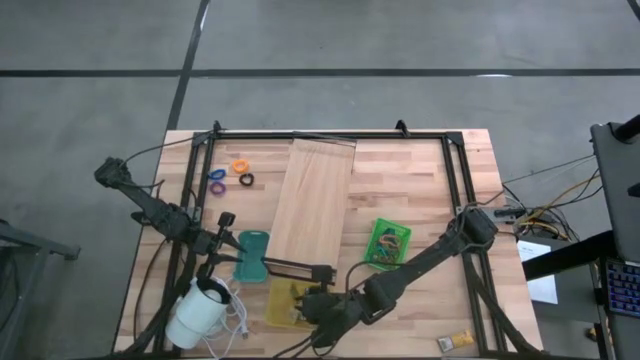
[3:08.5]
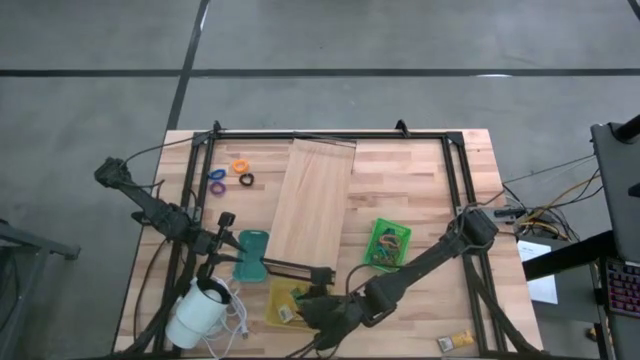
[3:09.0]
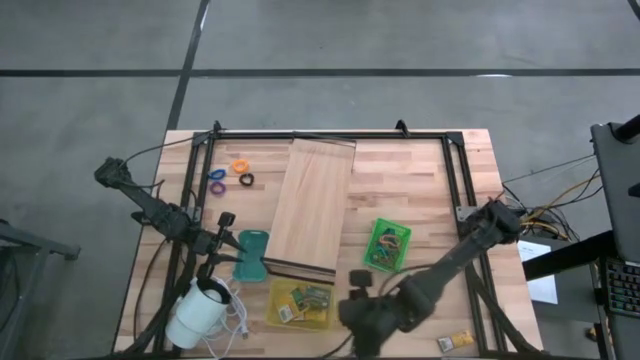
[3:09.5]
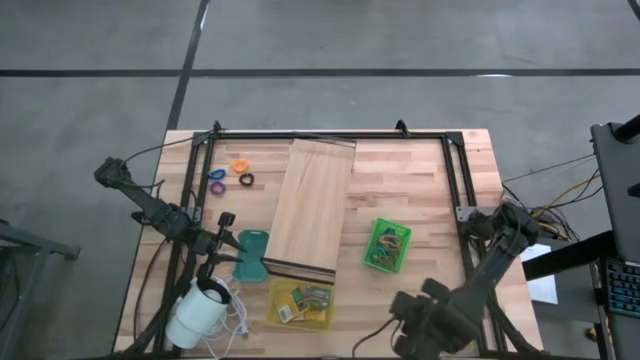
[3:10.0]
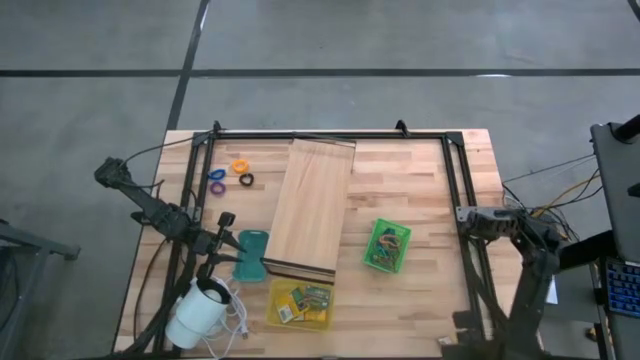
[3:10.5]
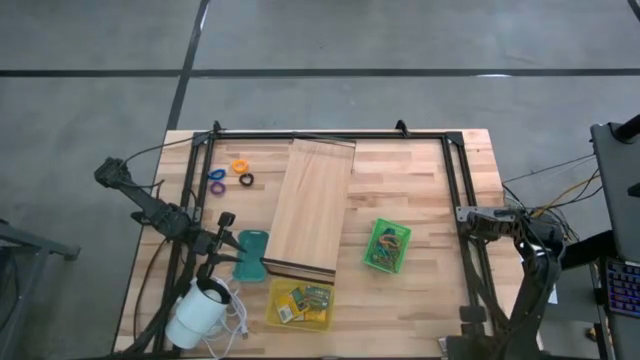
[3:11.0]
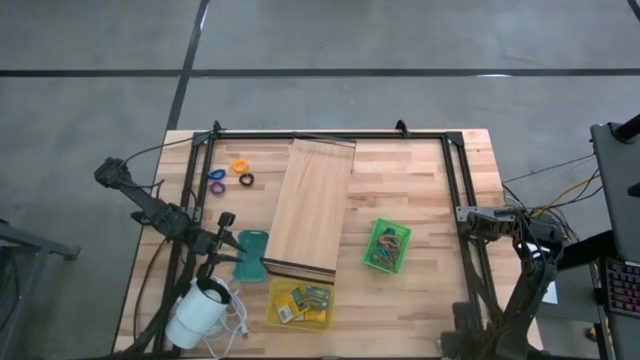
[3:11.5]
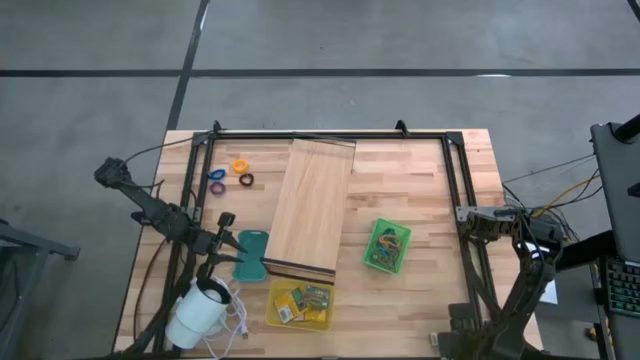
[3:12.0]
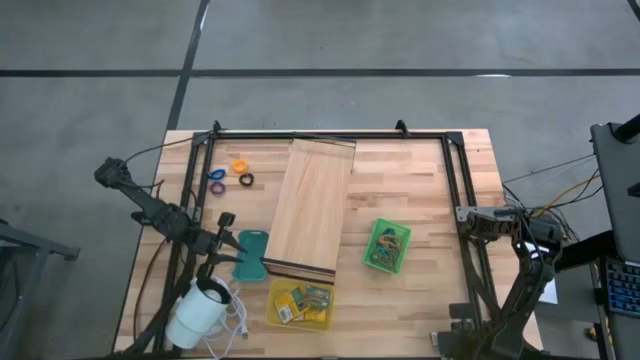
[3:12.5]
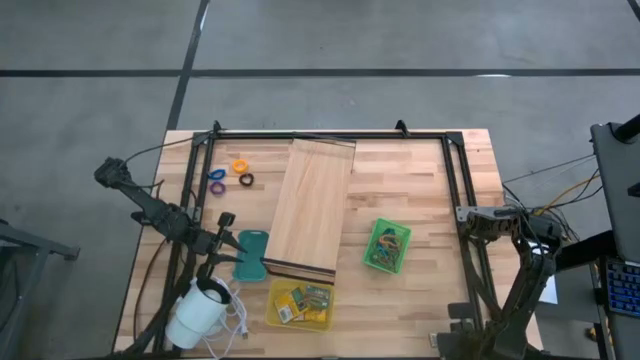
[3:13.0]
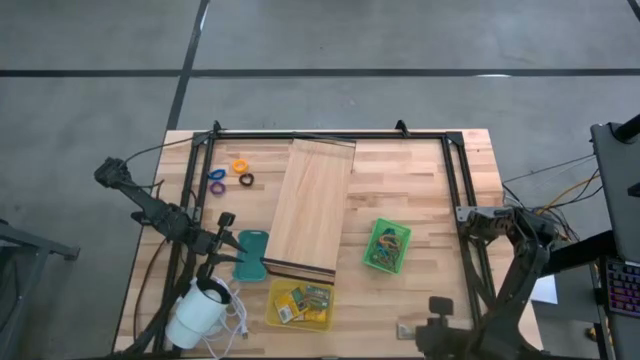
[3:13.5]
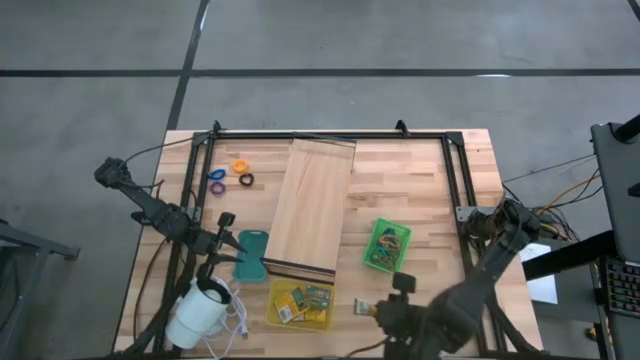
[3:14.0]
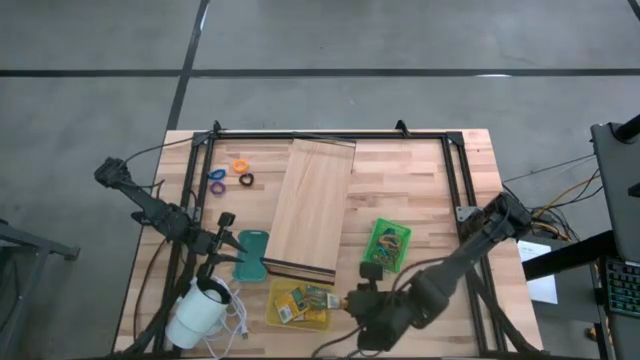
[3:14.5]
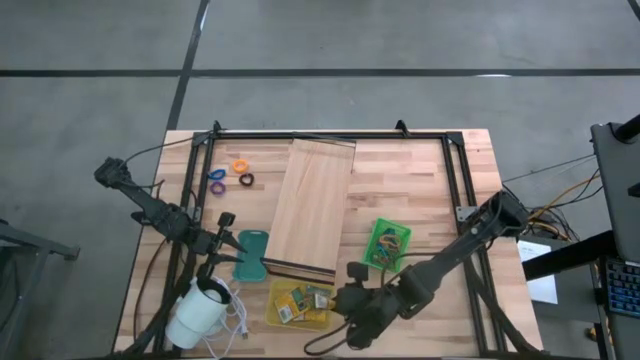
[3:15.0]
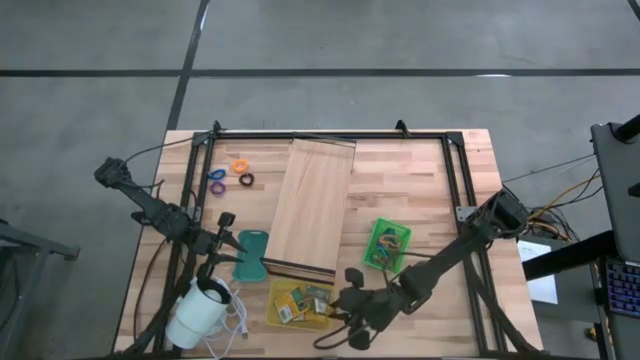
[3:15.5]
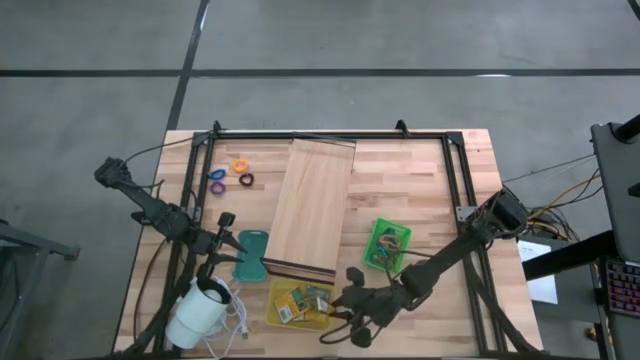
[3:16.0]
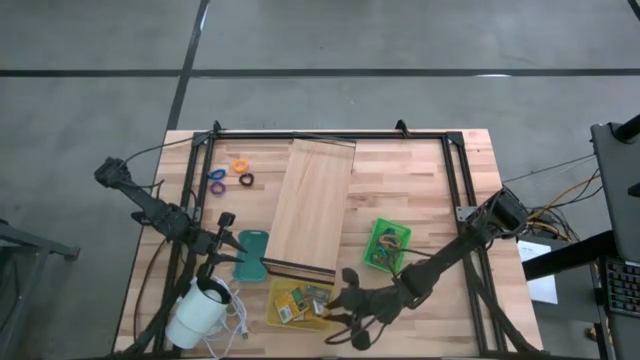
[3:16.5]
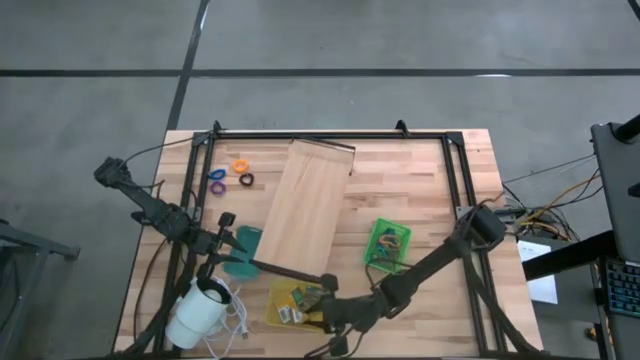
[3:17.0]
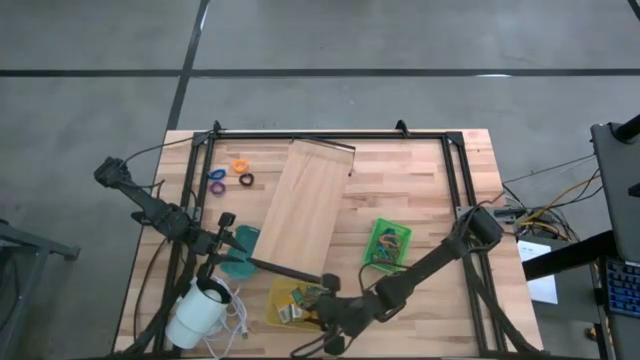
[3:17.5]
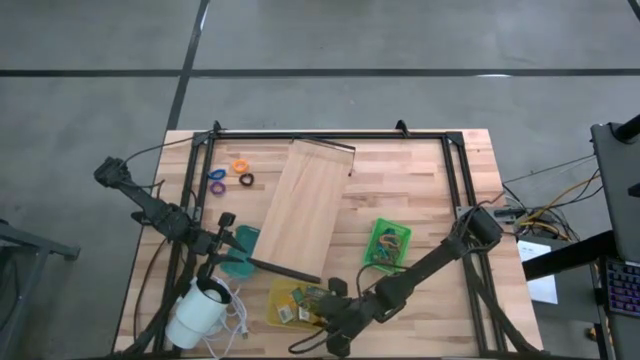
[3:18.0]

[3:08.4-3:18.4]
Task: Pick & Place Office Desk Supplies
Put the small yellow crayon box into the yellow bin

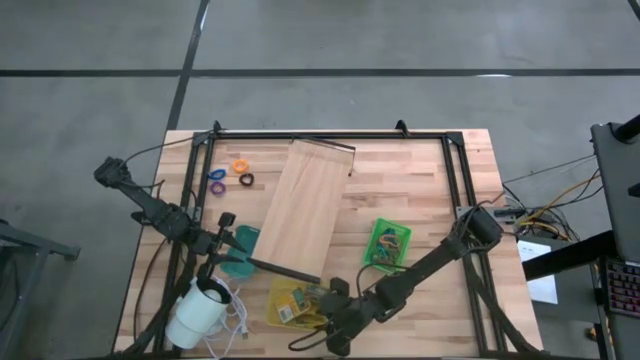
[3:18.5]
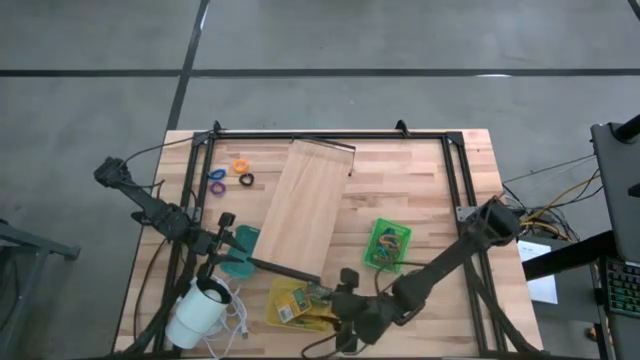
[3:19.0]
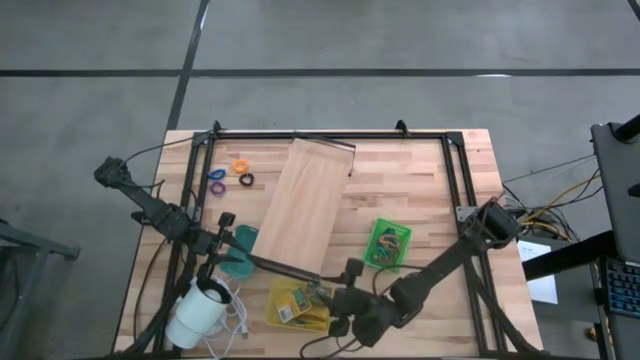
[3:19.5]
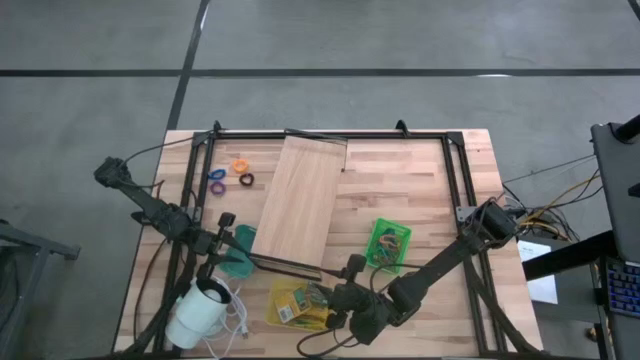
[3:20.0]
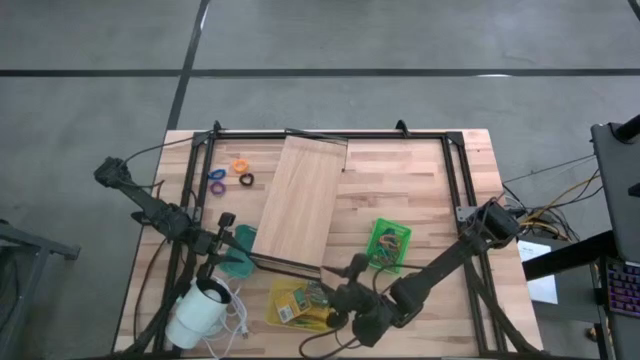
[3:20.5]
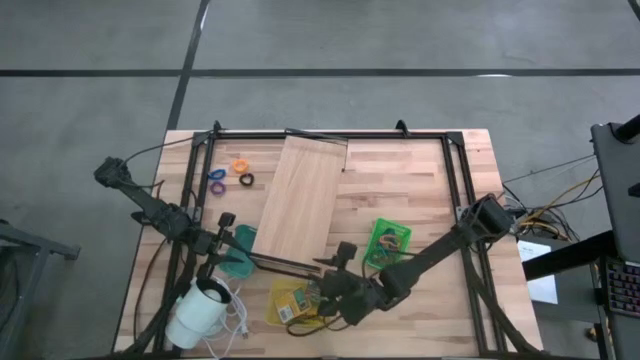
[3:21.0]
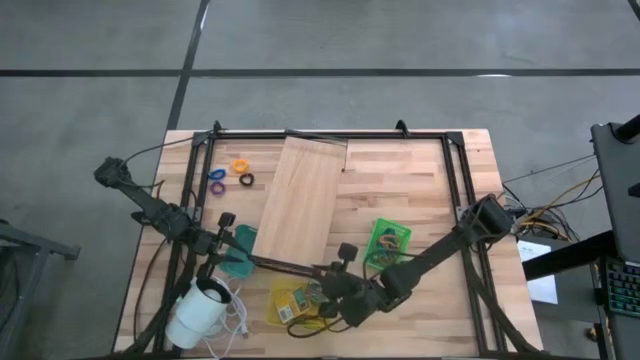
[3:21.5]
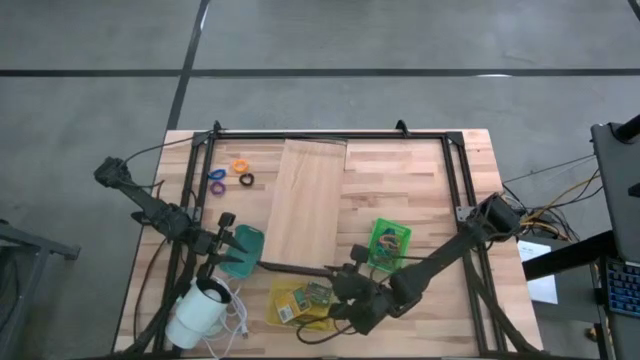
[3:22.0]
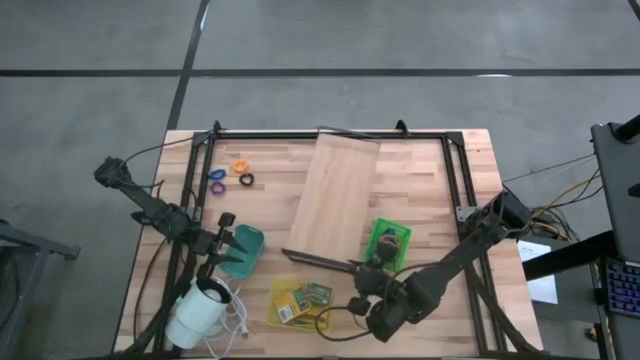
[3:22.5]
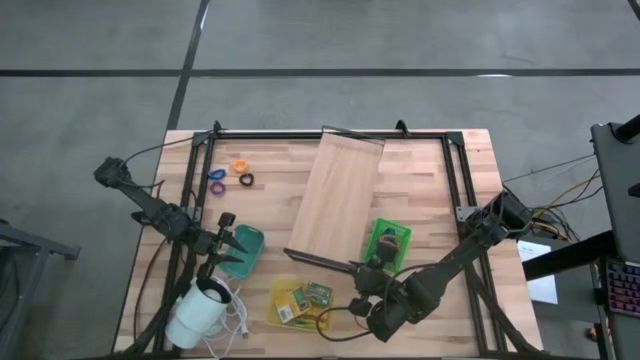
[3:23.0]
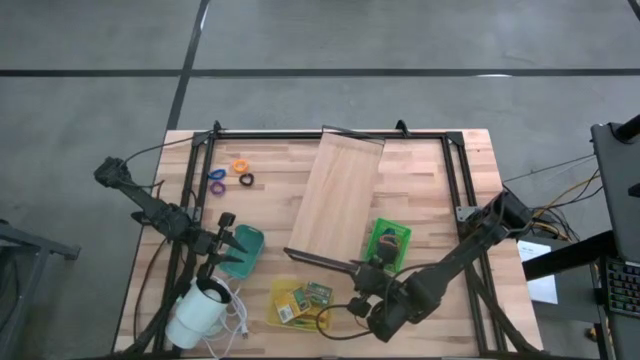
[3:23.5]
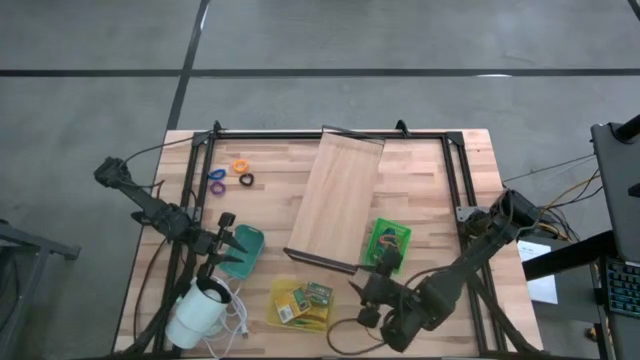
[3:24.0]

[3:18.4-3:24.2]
Adjust the shelf on the table

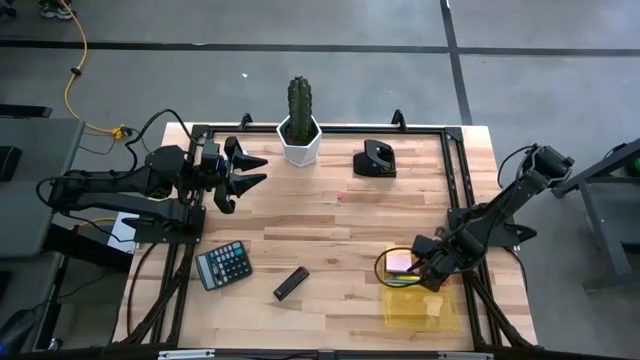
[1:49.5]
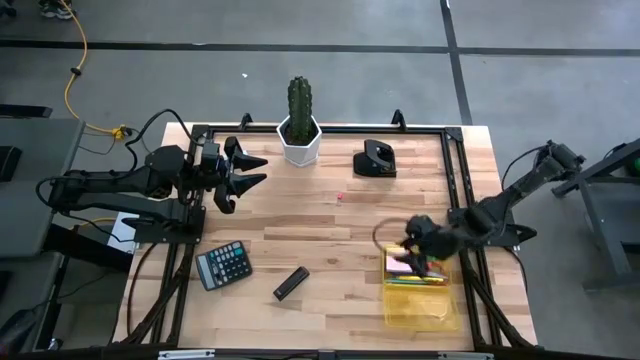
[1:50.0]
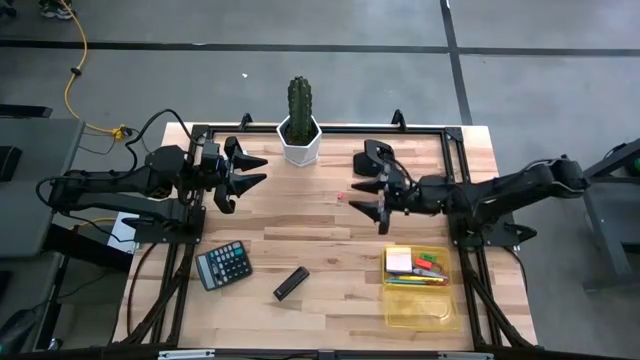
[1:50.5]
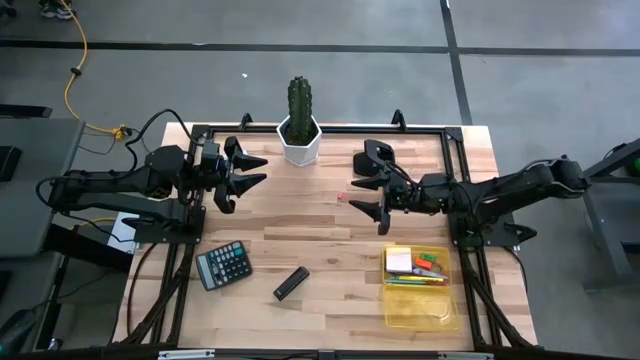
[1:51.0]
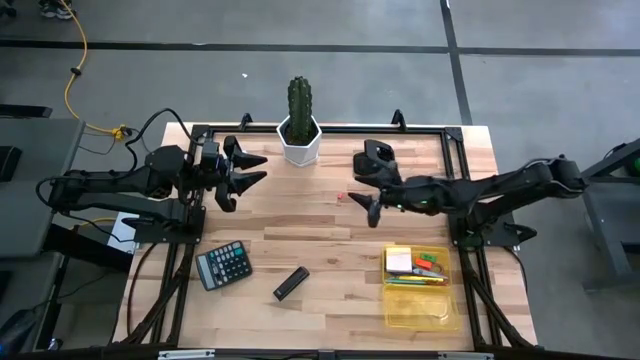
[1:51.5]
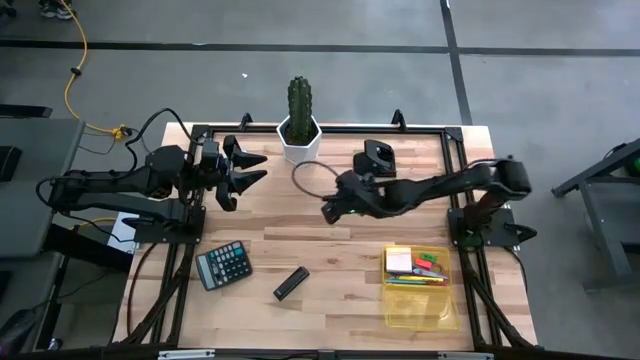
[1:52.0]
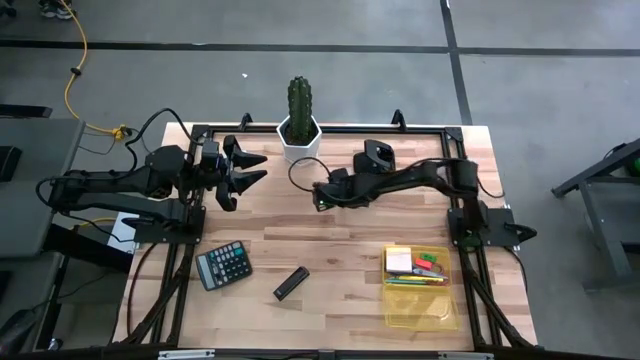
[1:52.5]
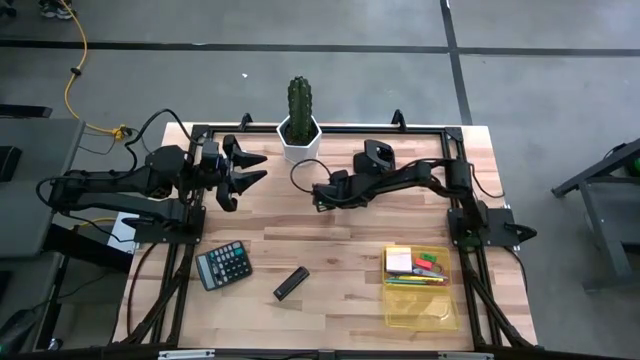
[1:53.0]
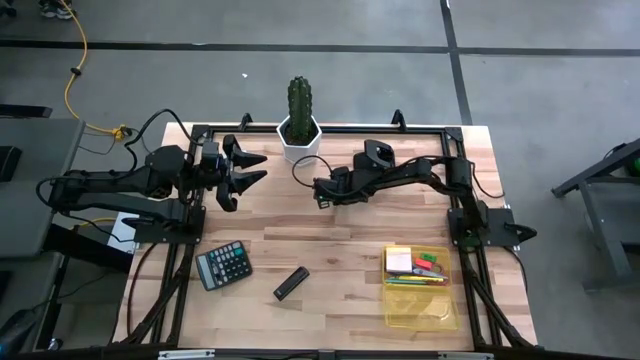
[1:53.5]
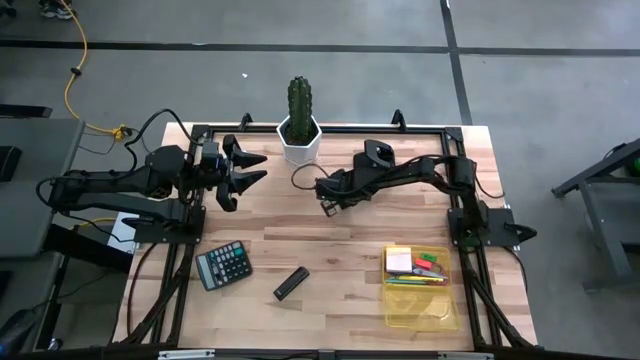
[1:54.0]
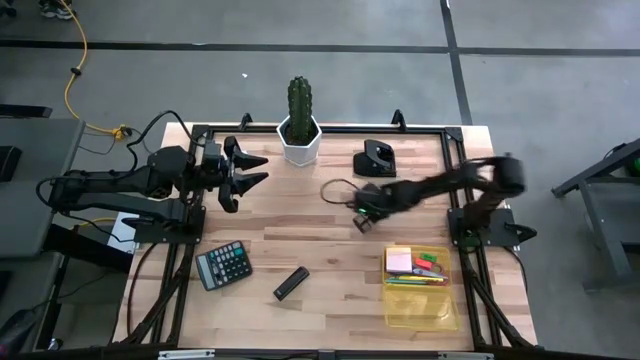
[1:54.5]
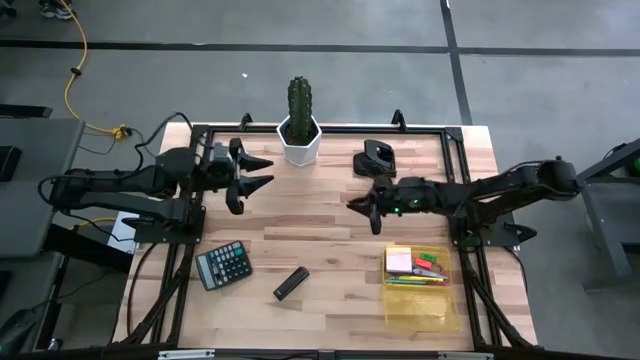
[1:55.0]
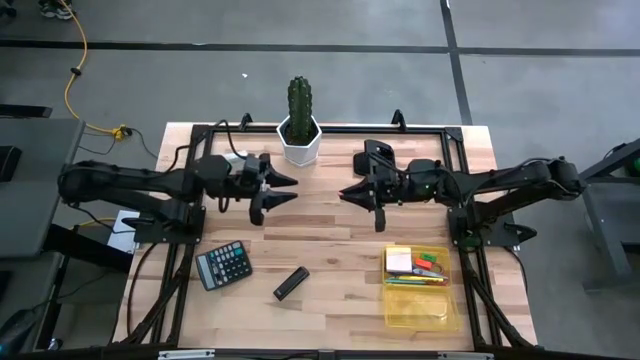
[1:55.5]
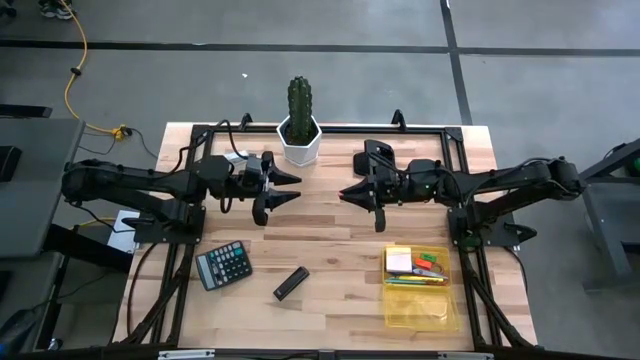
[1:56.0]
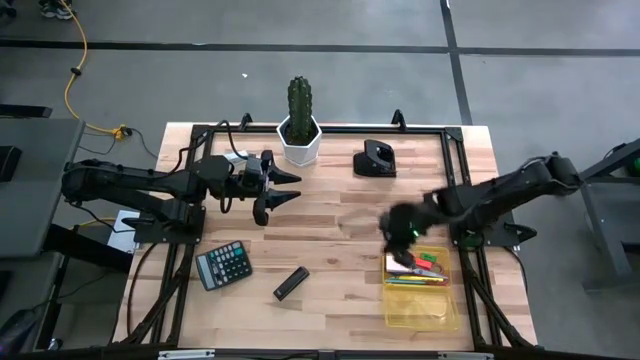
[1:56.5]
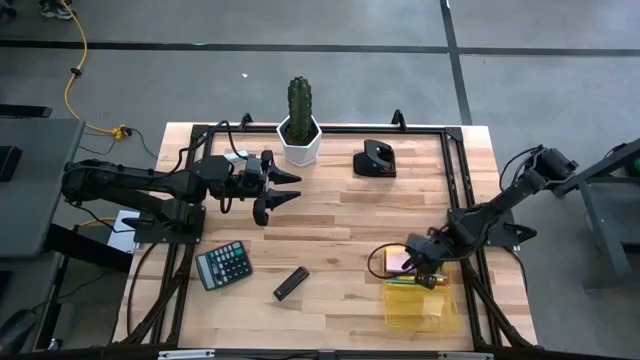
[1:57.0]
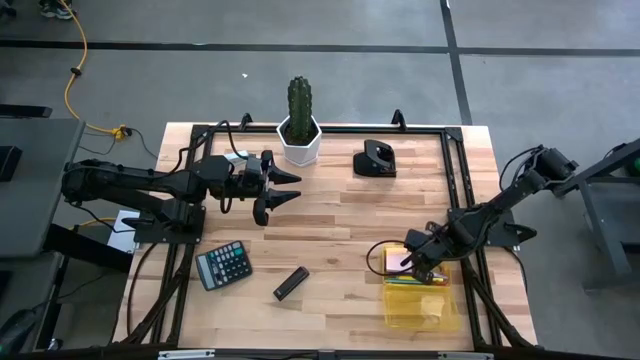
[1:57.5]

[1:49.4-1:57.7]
Task: Pack school essentials
Put the small pink eraser on the yellow supply box
